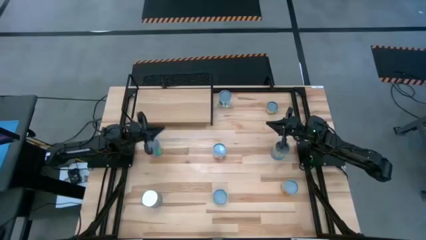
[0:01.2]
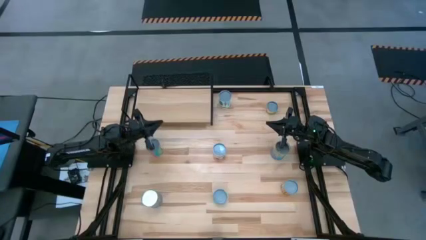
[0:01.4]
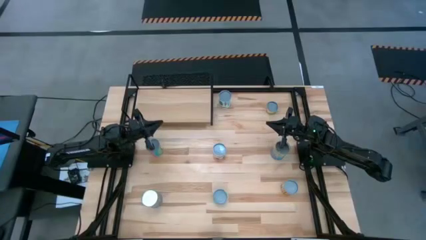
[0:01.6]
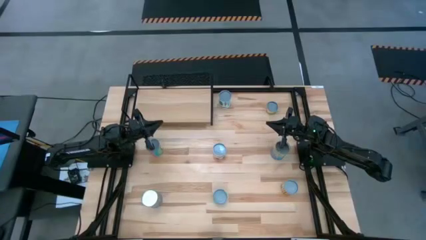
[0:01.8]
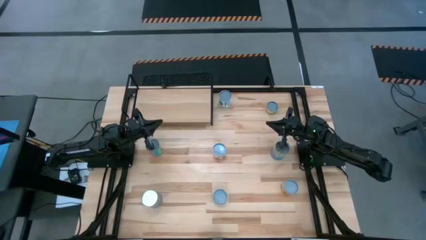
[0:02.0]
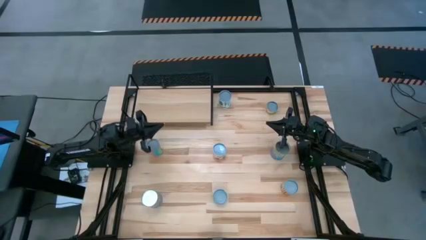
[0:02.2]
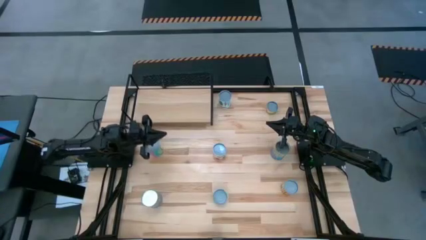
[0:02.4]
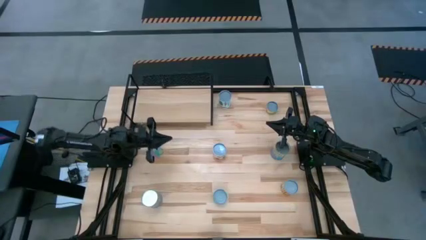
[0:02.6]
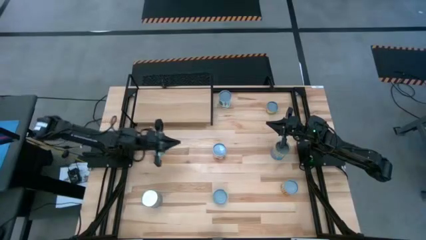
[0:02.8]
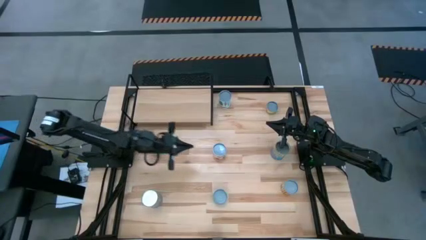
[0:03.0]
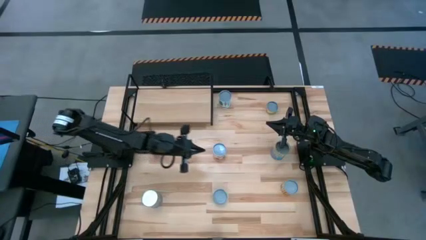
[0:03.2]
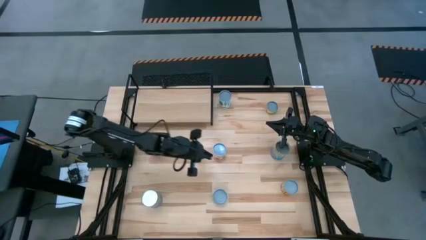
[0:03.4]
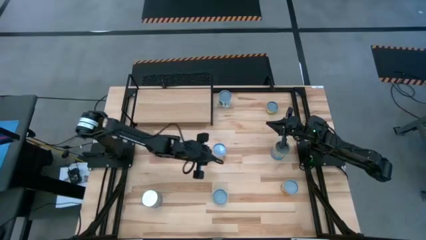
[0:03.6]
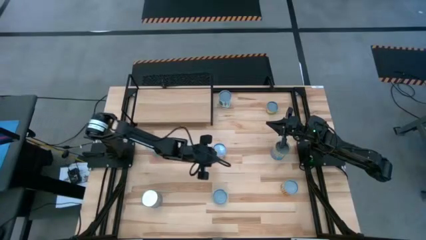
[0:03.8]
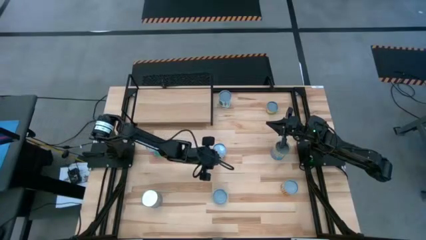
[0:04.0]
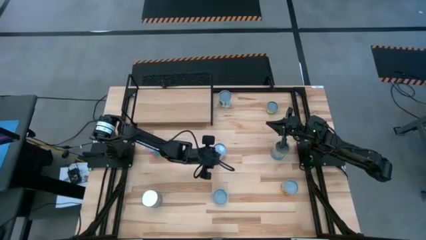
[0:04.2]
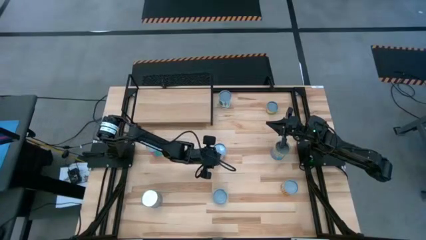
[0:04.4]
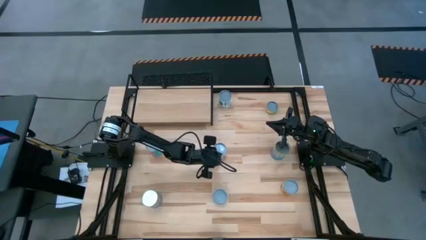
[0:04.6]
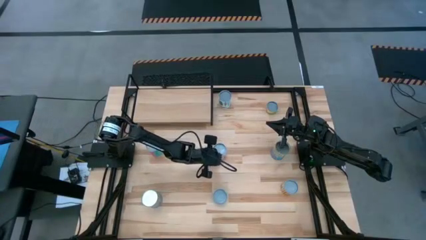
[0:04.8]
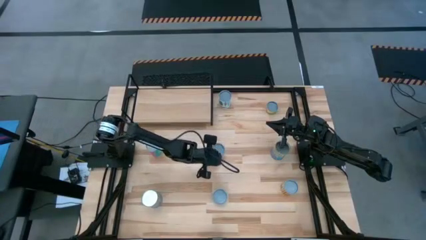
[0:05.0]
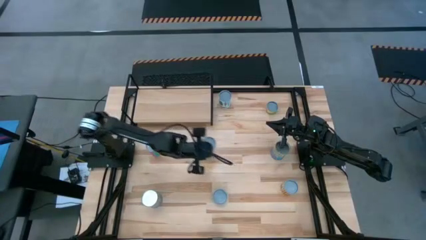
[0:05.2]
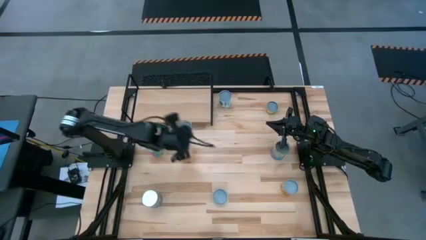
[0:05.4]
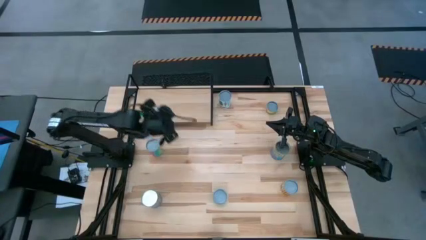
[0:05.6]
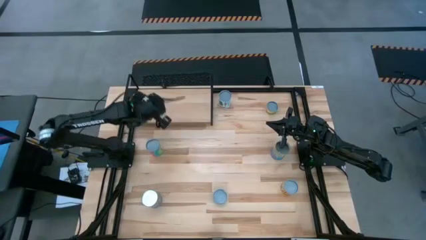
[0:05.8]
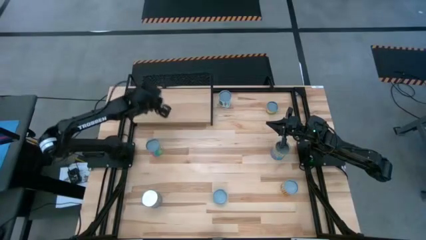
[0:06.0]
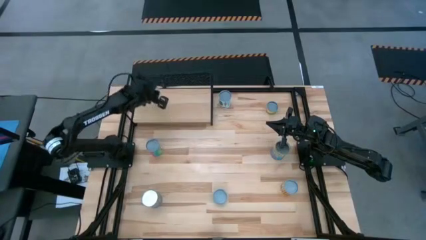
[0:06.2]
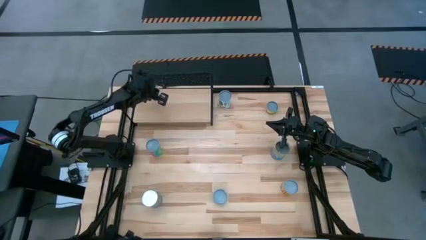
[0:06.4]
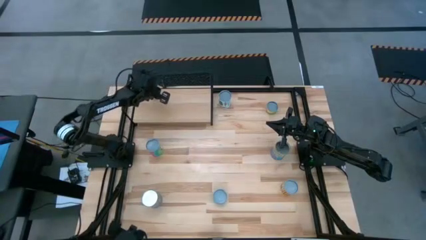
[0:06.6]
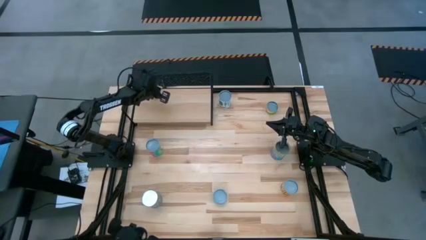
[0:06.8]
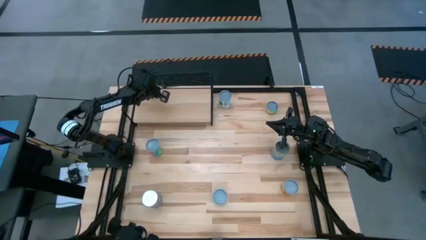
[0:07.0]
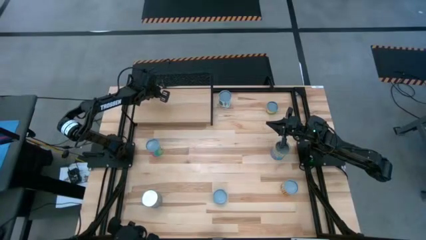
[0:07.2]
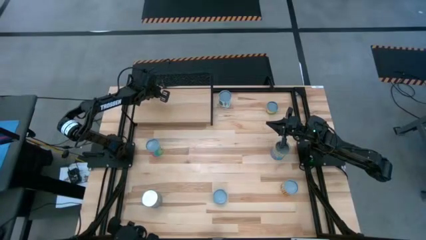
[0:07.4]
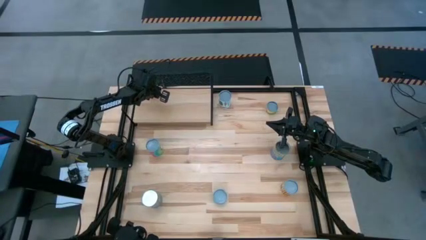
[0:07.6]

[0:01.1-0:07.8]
Task: Pick and place cans onto a shelf
Put the canned saucy meatballs on the shelf

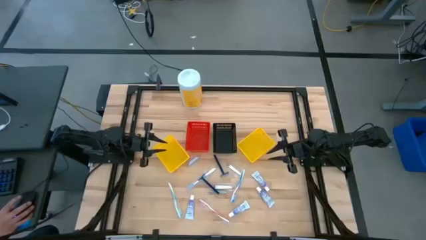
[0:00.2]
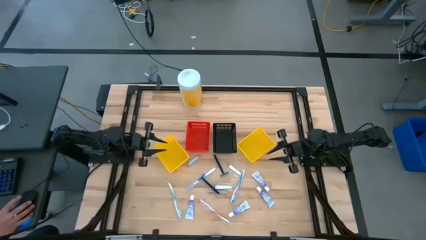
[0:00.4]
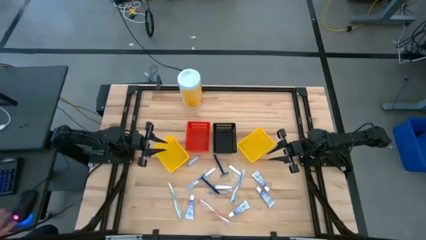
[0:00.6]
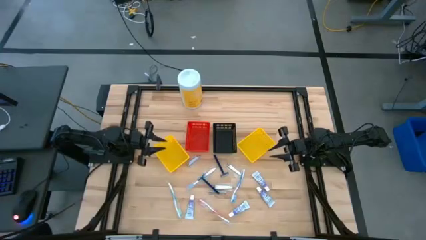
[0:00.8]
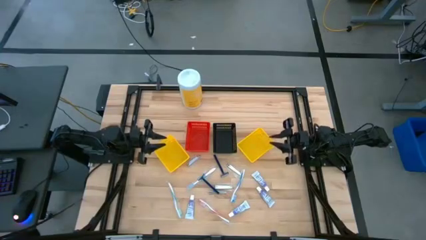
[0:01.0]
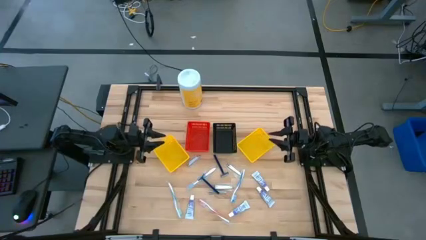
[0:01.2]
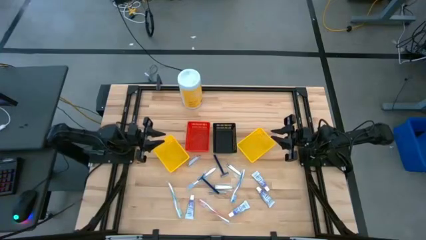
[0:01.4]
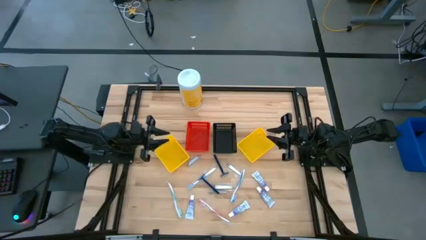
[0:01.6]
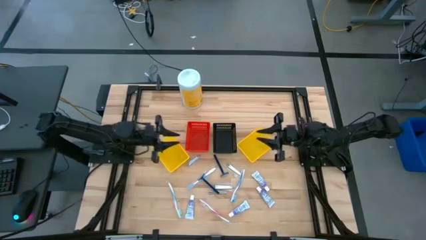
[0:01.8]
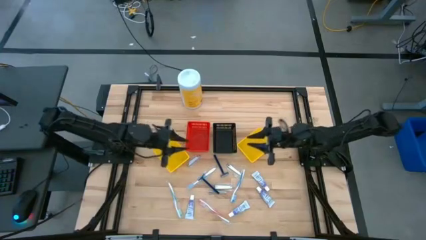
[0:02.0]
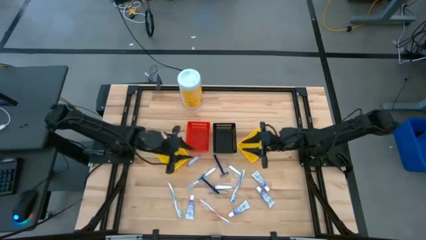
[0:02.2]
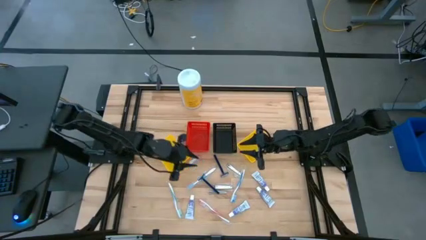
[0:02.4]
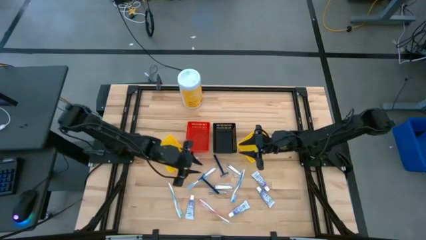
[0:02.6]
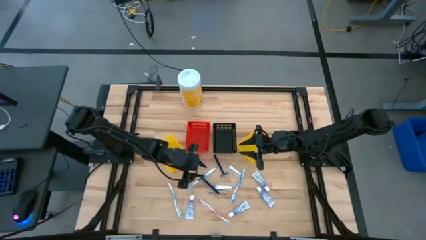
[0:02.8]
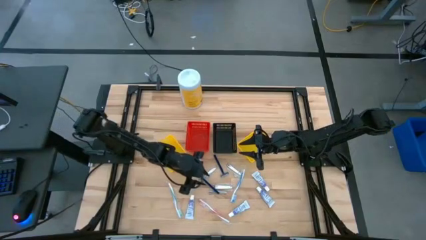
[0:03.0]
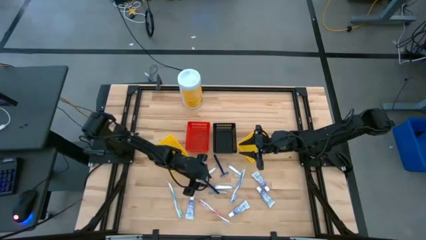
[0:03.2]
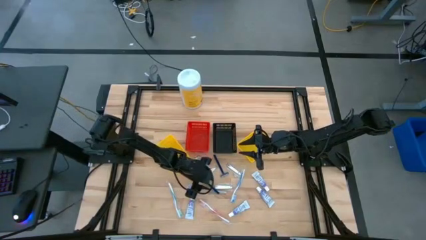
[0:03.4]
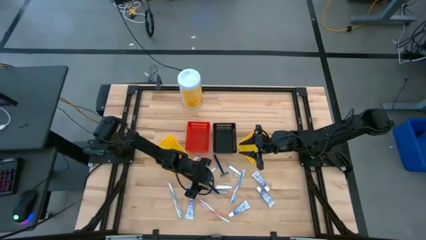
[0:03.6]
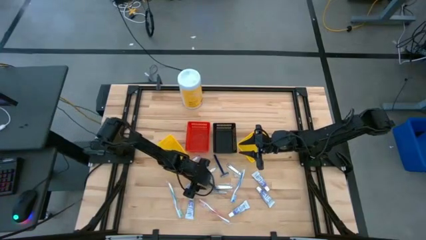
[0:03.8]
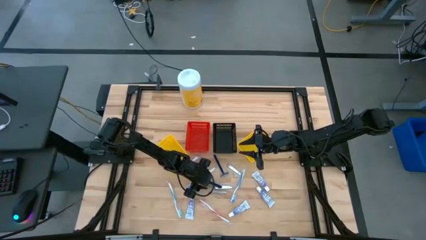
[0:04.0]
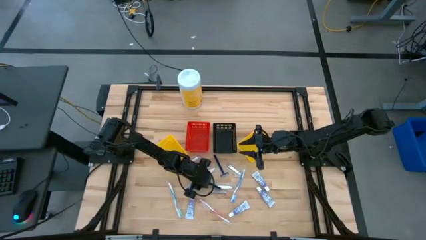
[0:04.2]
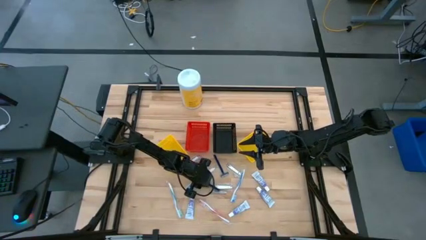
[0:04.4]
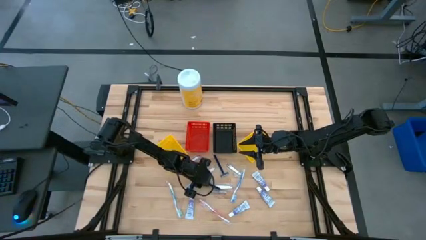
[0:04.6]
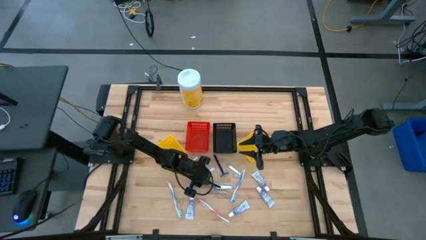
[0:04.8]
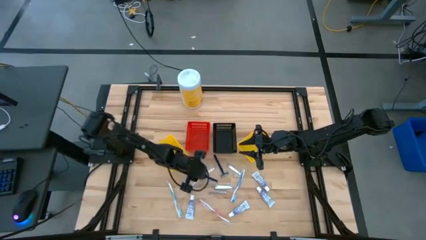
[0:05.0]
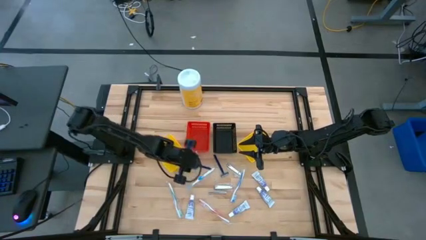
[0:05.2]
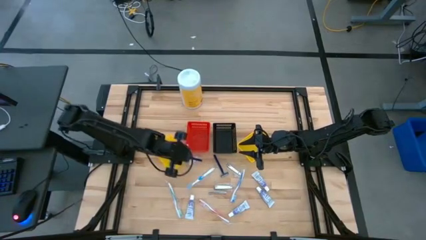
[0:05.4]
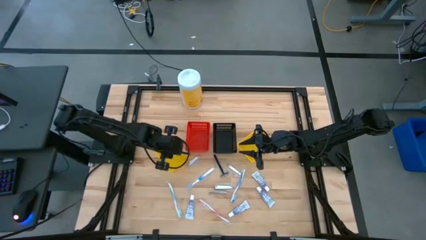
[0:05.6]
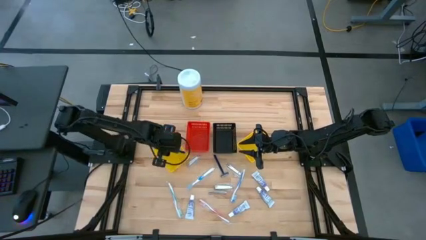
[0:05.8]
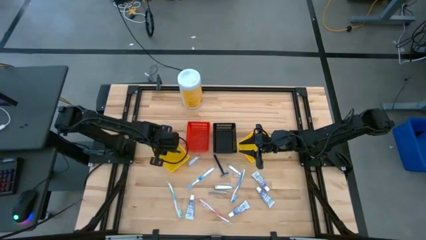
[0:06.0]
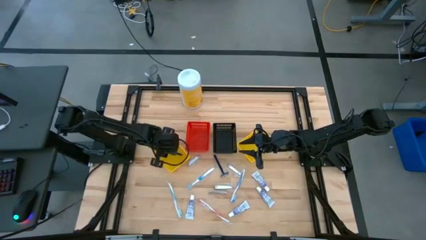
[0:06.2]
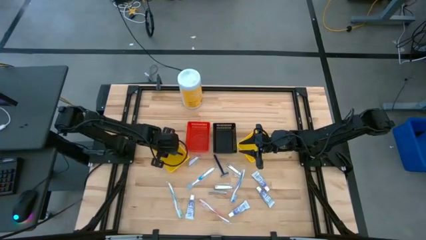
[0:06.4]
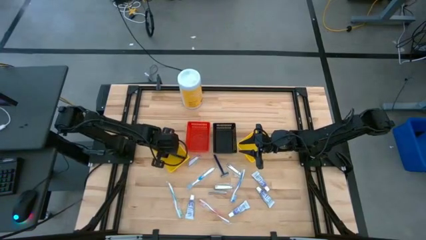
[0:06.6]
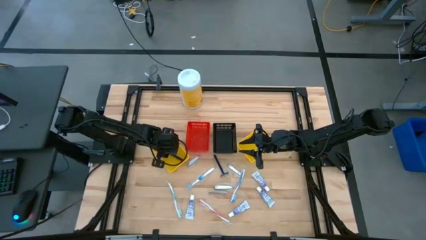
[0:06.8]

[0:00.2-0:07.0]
Task: Pick & Place Travel size toiletries
Put the blue razor into the left yellow bin
